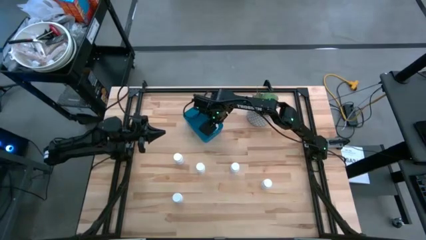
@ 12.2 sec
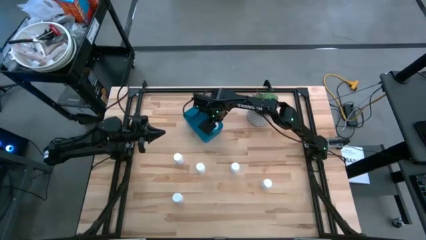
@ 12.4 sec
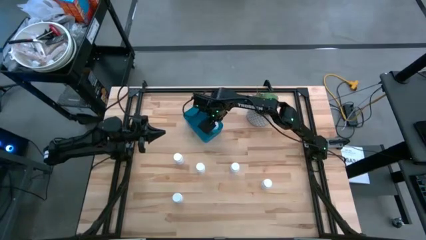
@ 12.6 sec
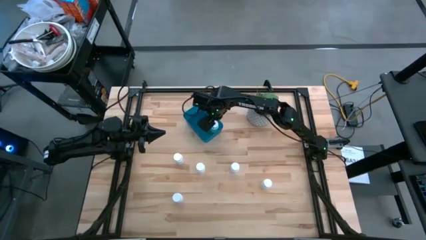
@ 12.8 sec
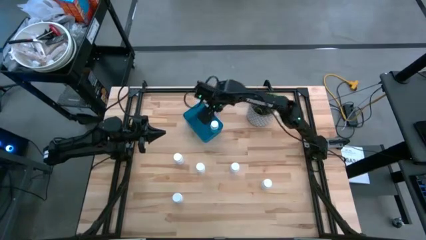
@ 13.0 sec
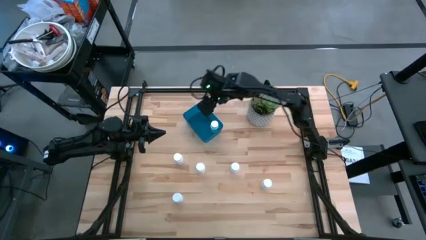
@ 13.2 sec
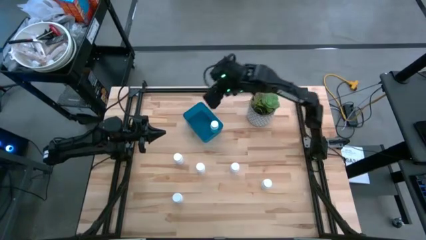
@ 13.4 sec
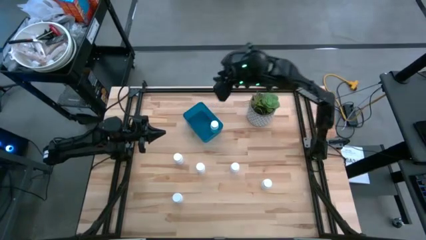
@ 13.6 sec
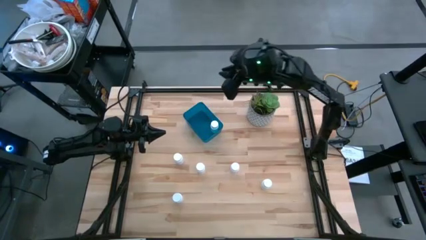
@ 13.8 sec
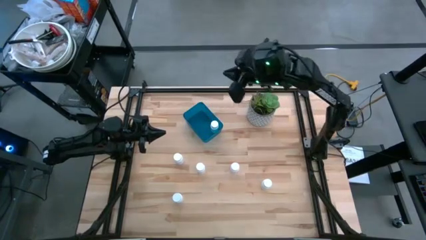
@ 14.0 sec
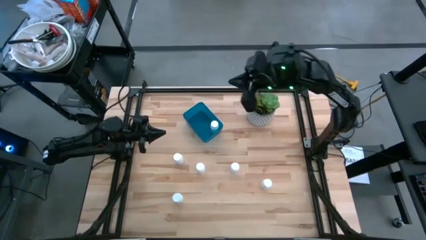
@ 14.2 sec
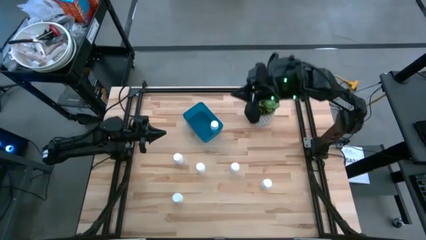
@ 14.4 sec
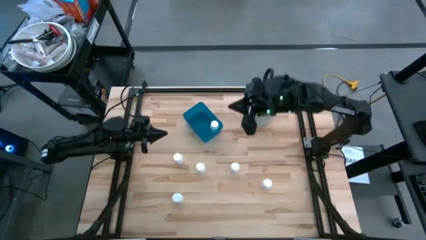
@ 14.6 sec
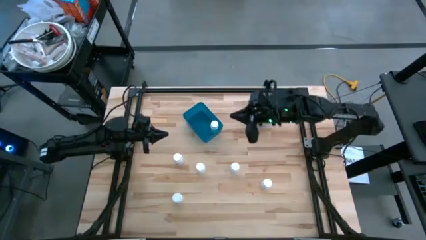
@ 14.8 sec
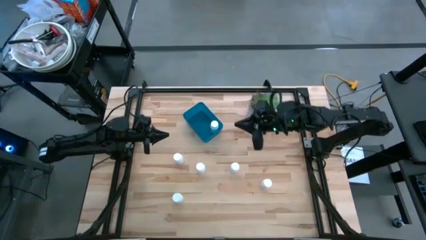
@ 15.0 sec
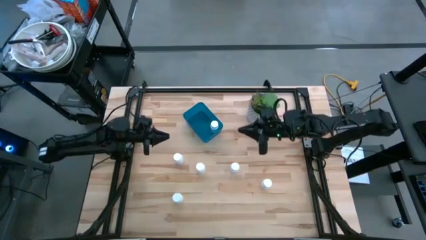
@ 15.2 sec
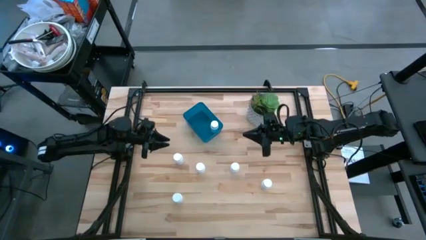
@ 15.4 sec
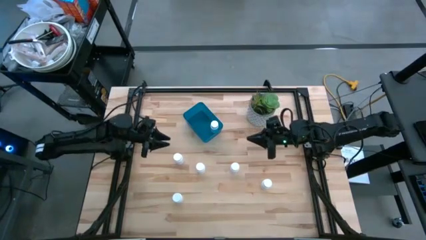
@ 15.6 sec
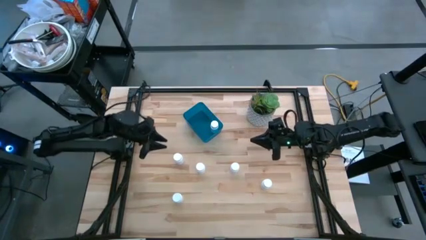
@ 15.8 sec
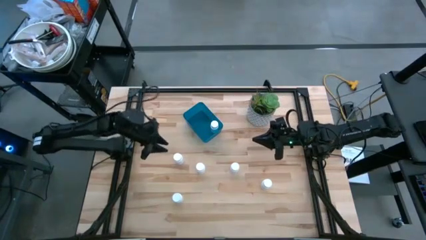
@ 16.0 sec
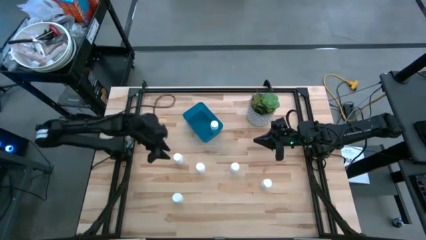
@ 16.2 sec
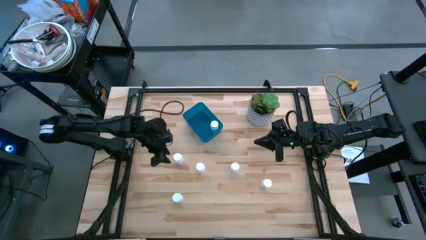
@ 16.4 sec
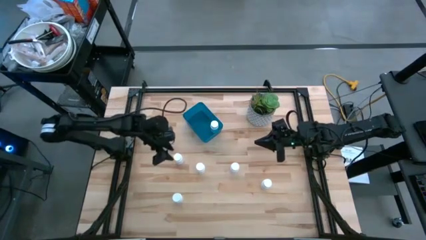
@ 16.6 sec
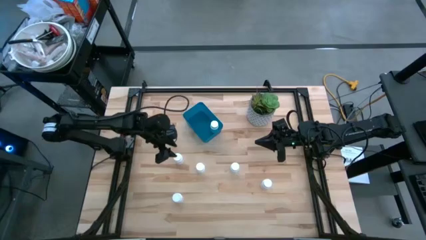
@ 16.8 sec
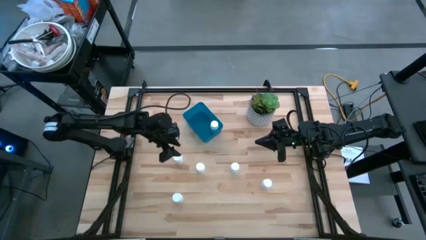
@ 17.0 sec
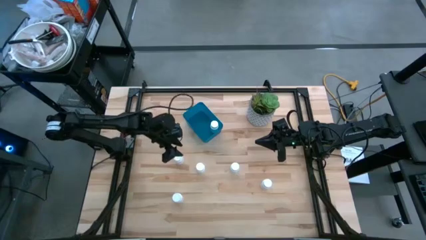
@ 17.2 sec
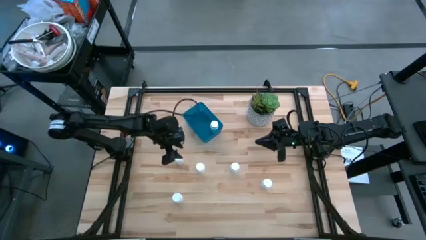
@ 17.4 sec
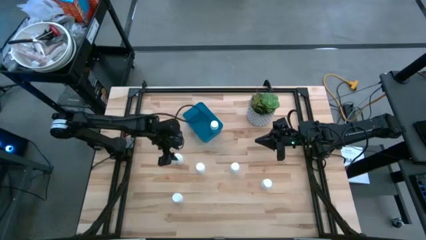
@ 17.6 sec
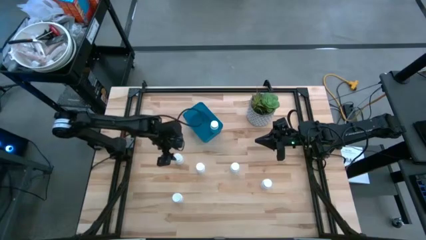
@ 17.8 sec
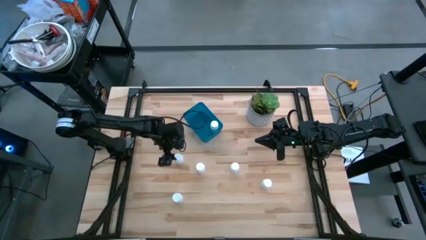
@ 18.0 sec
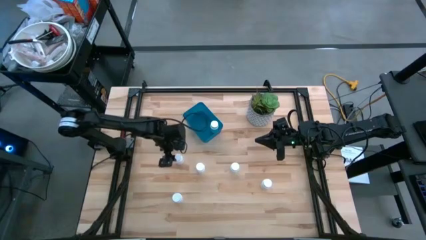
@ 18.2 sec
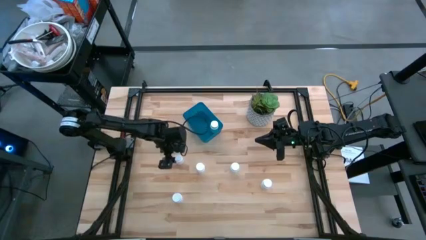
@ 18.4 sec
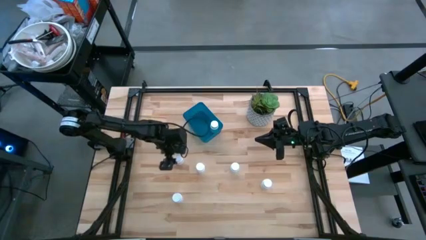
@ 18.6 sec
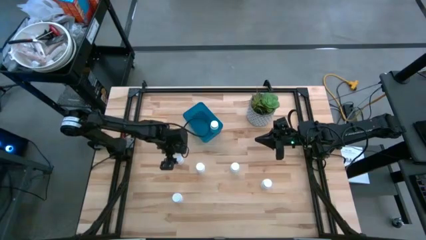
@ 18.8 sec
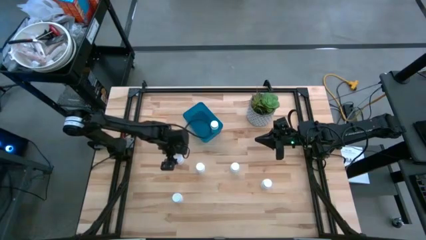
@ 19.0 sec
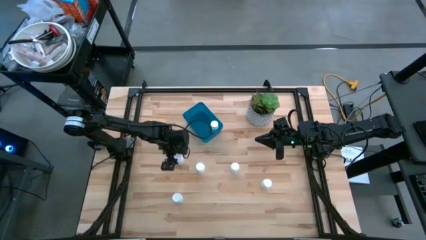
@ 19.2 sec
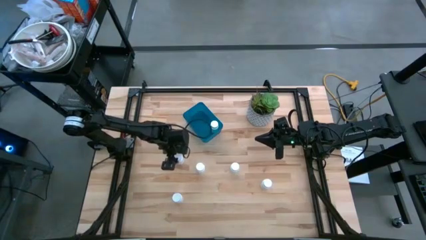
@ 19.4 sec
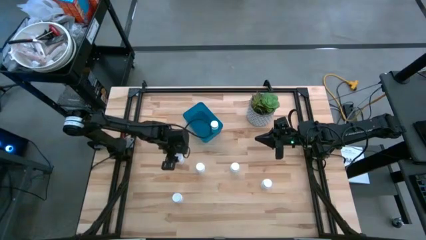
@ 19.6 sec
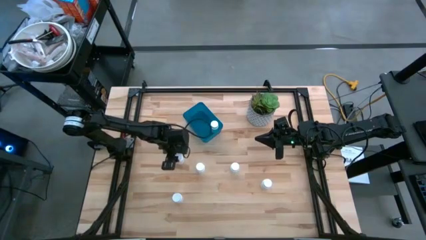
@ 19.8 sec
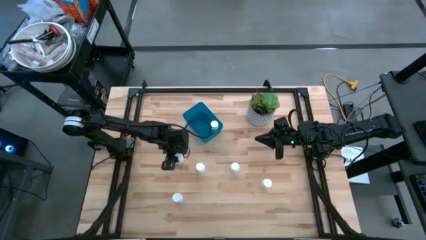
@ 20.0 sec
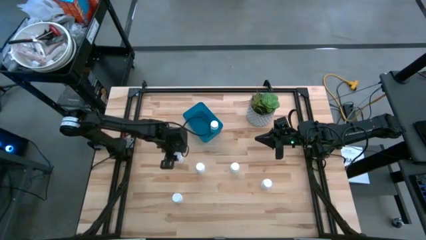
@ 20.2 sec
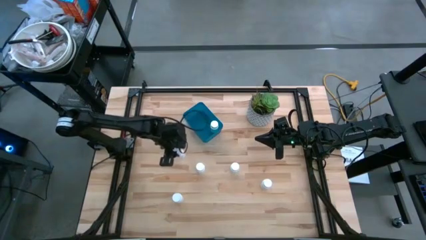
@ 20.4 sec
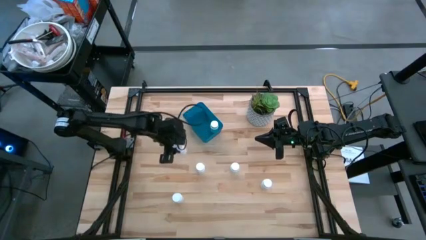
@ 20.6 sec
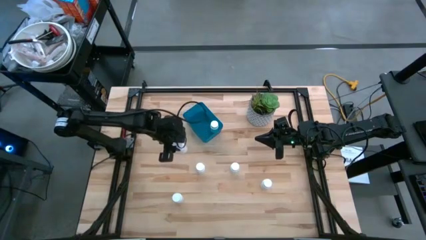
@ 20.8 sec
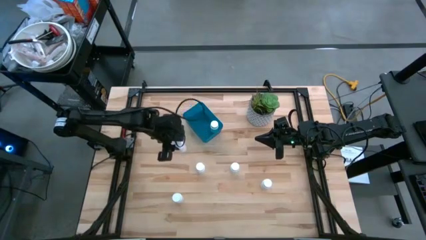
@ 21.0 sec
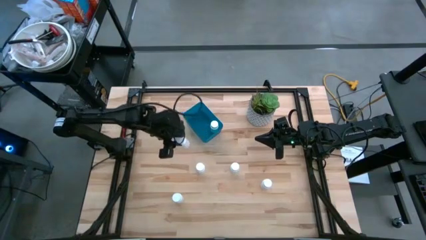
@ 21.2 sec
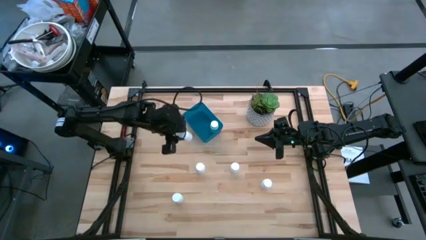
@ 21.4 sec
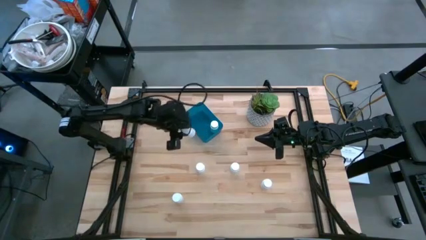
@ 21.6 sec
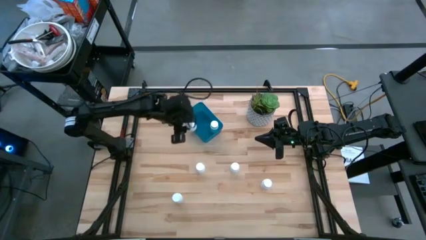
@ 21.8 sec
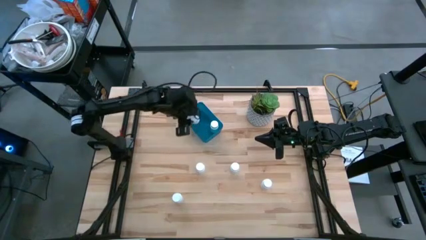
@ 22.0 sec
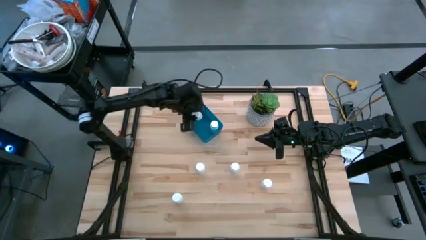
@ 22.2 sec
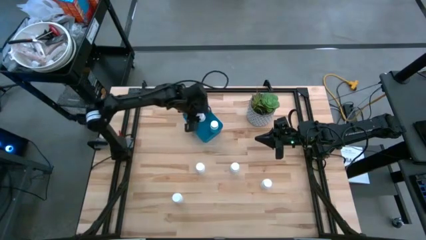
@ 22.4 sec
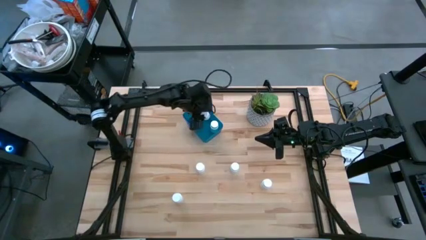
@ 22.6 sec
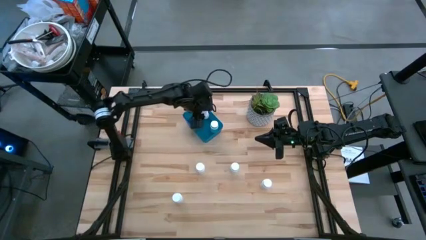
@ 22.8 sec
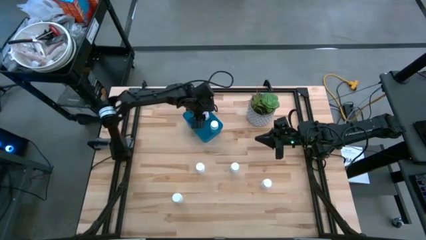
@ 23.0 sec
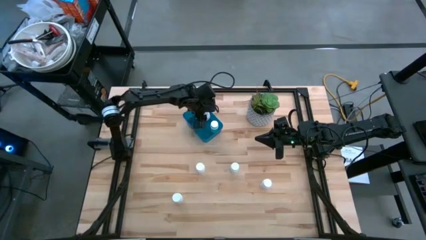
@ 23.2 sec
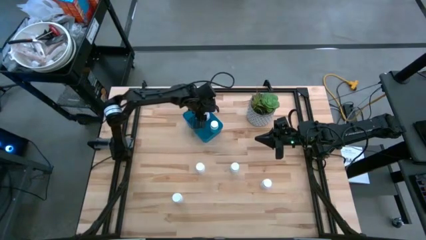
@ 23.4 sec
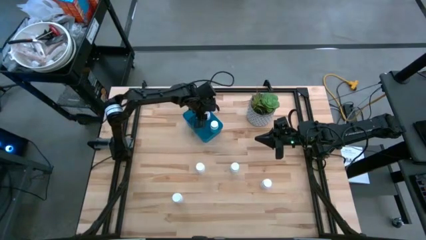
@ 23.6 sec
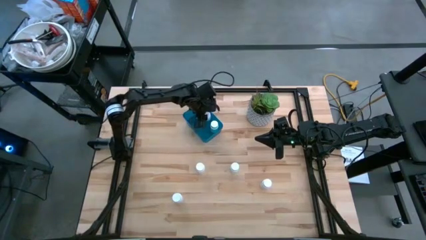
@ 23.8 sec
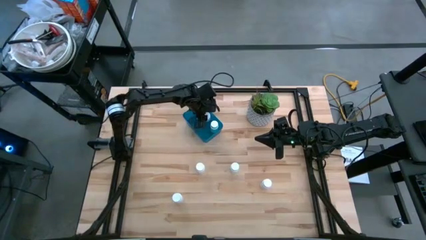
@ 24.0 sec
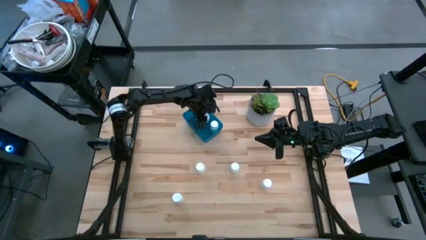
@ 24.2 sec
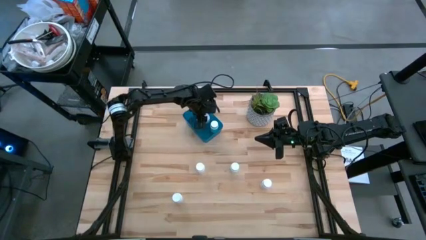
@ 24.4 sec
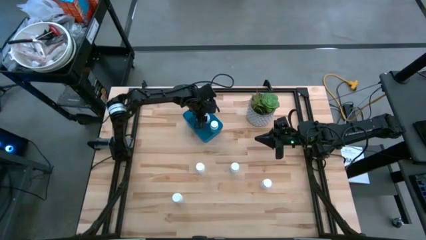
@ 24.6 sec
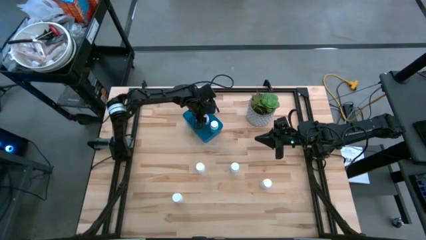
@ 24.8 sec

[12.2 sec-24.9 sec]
Task: Pick and place pill bottles into a basket
Put the white pill bottle into the dark blue bin
